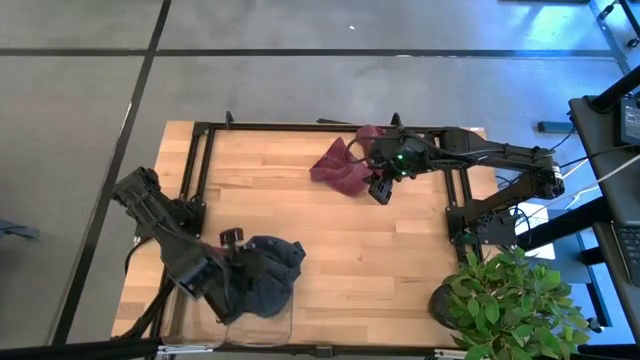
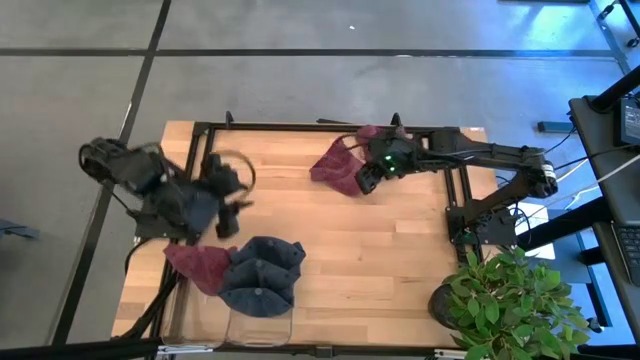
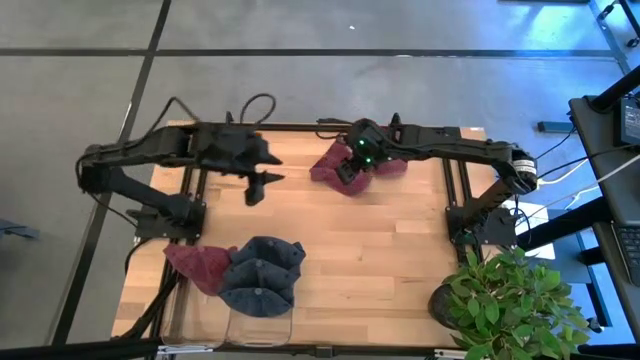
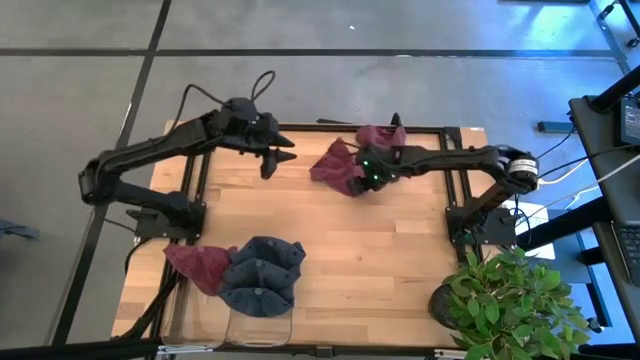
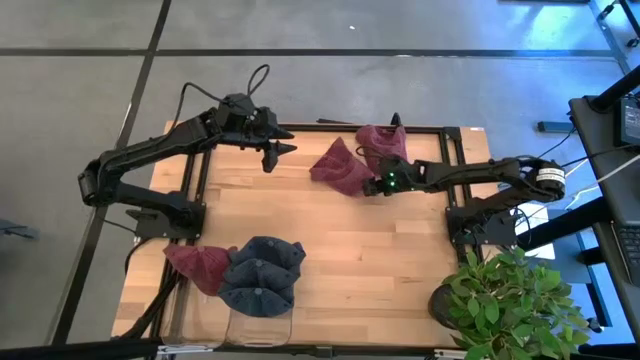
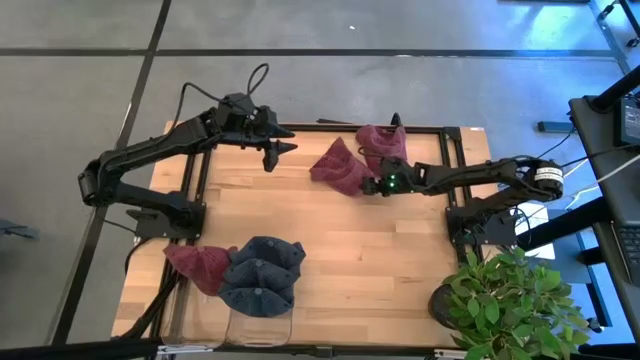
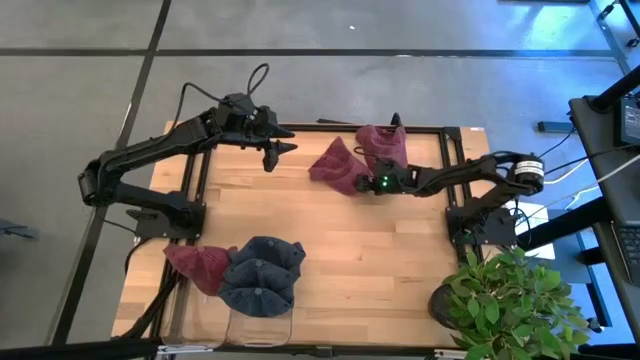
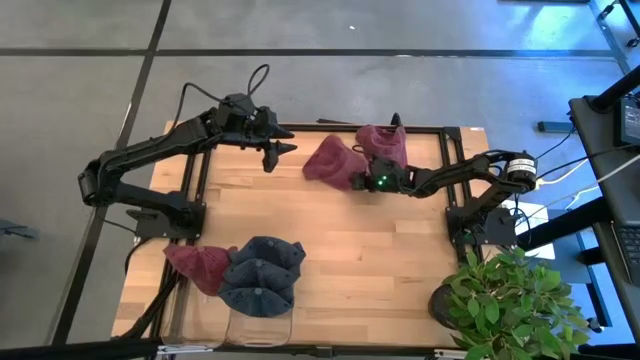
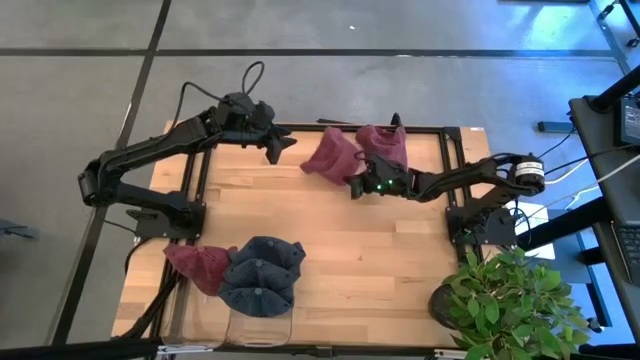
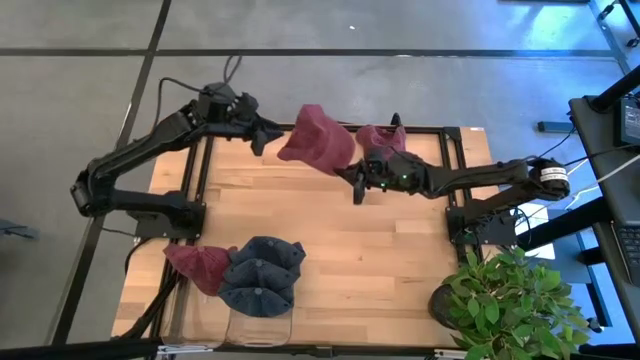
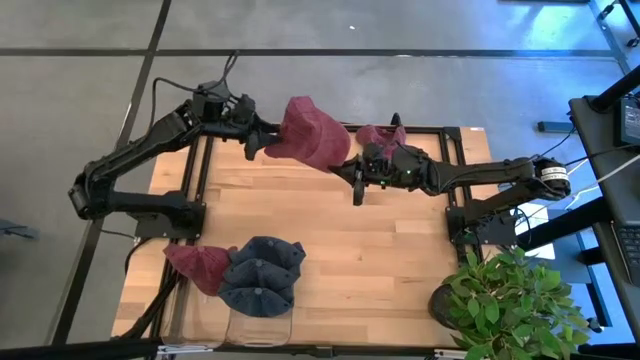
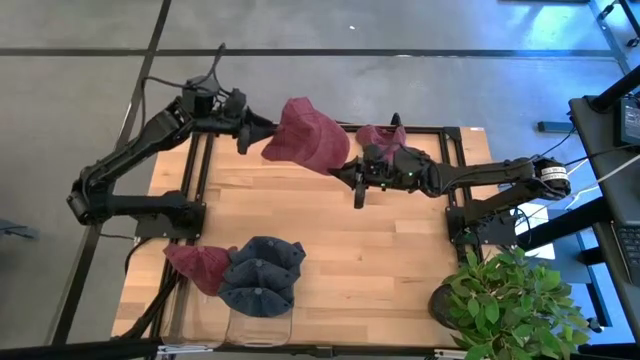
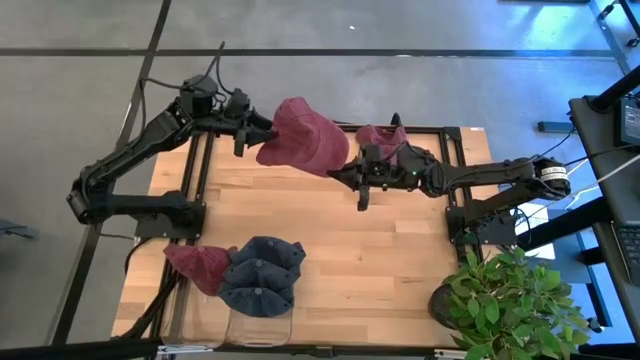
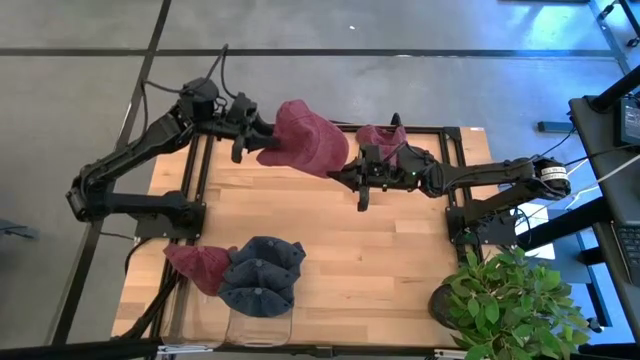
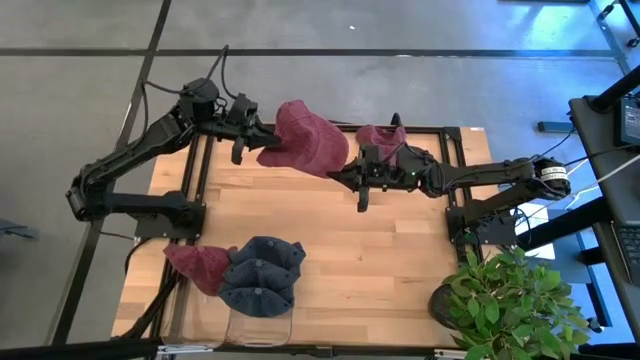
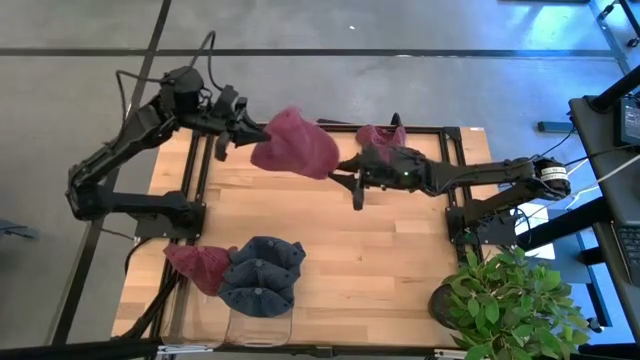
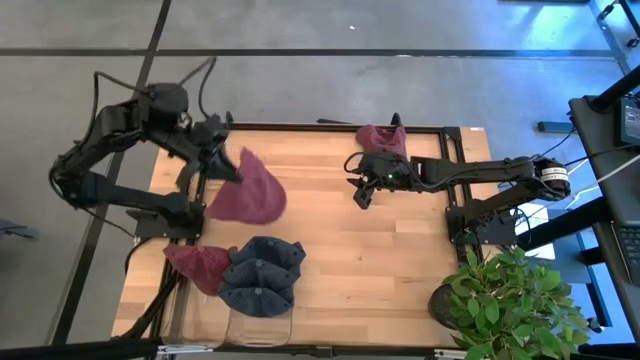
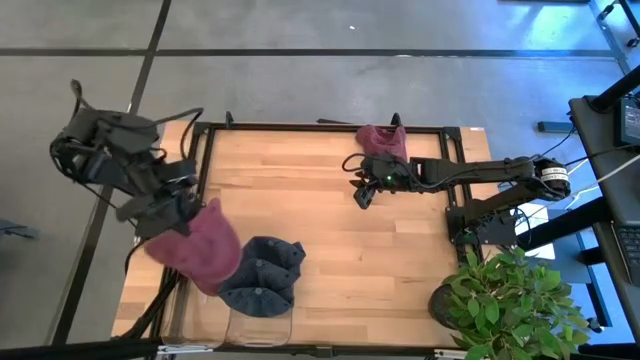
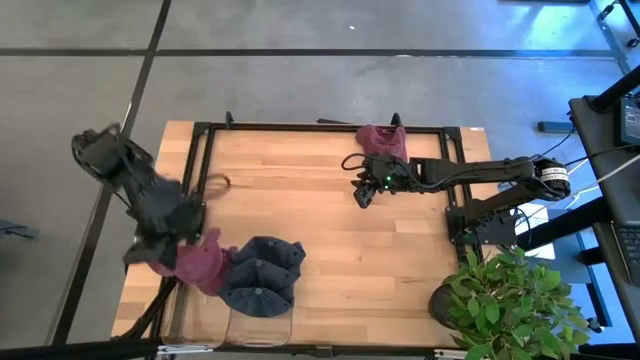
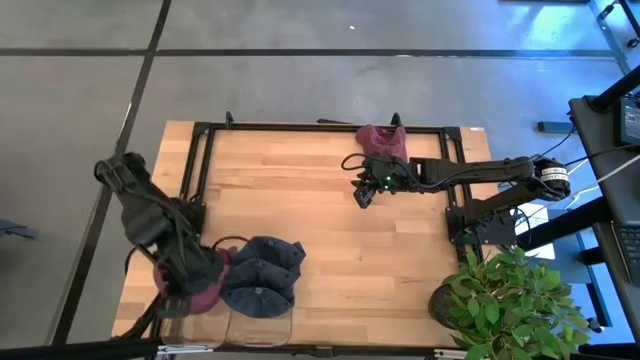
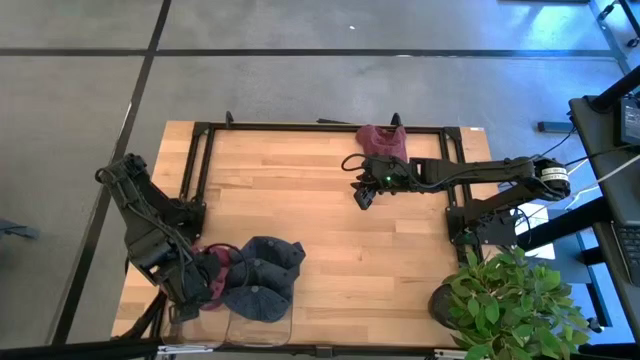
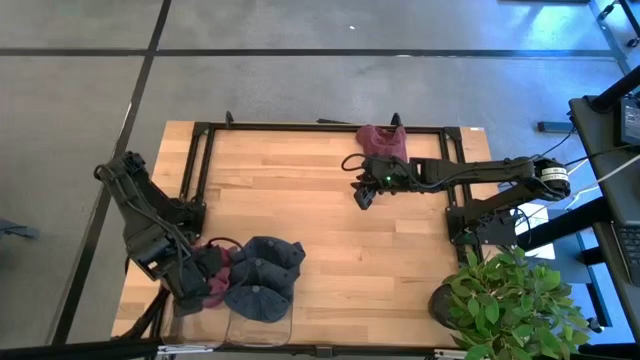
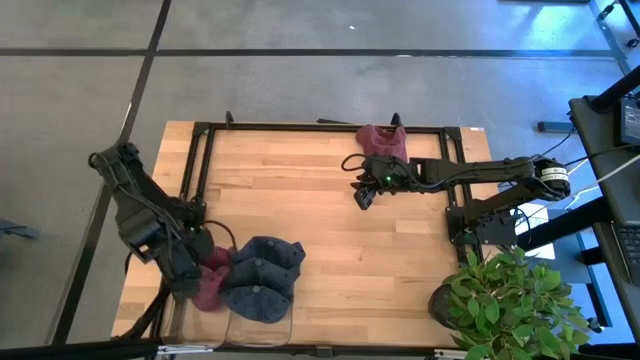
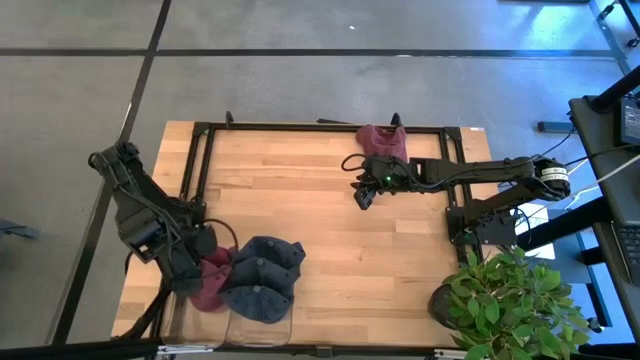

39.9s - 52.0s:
Task: Pick & Place hat
Put the left red cap into the left transparent bin

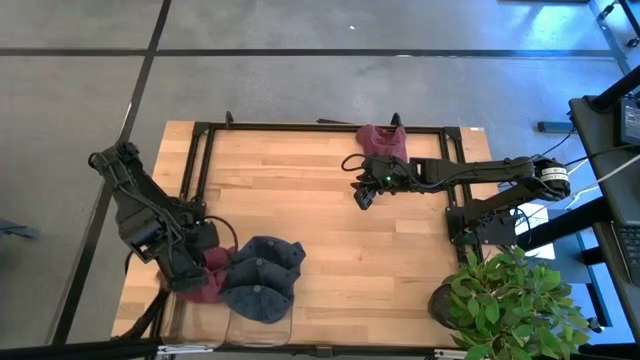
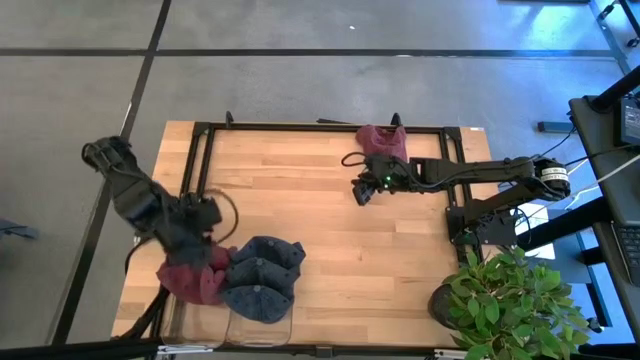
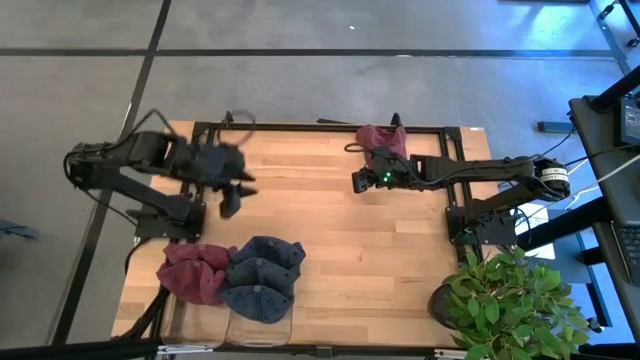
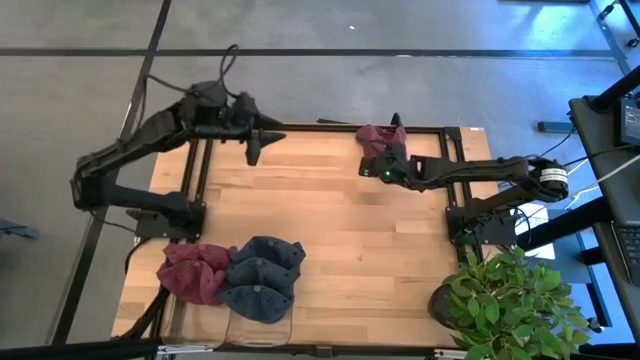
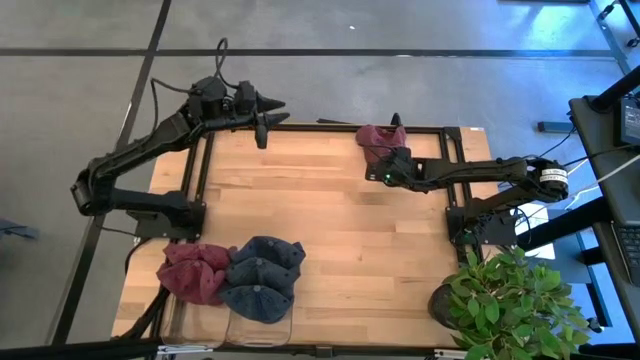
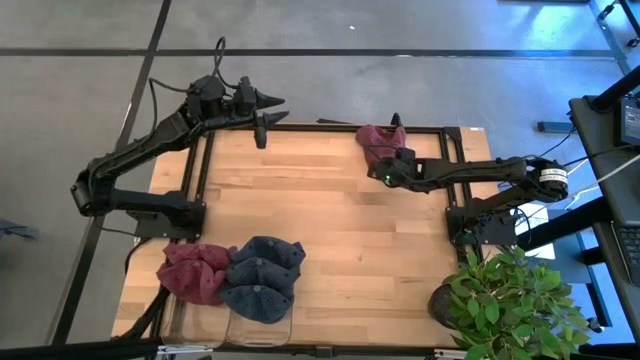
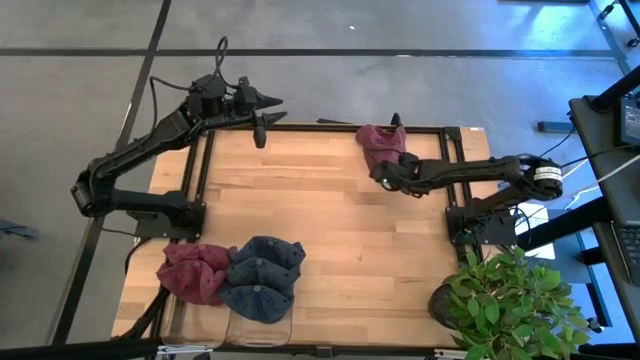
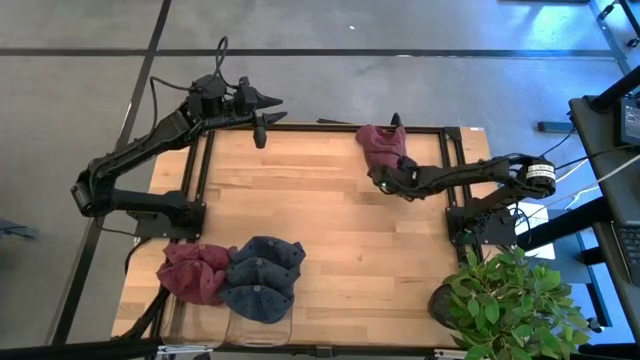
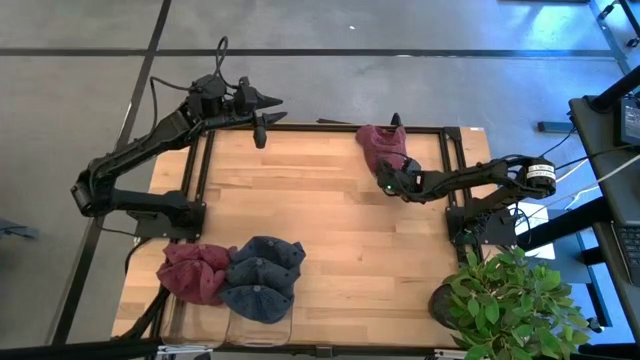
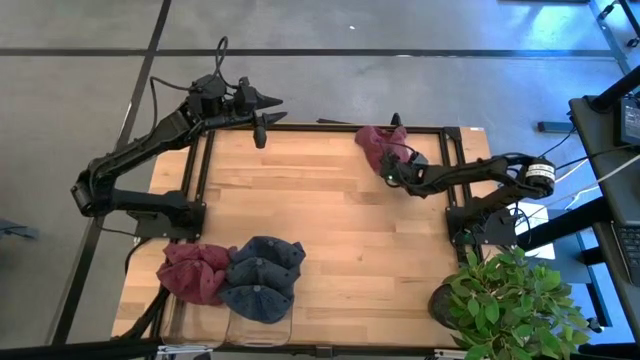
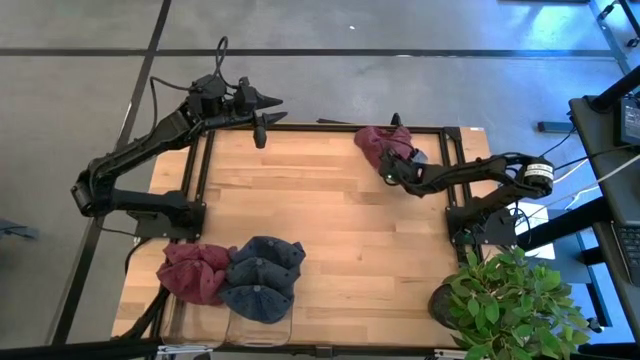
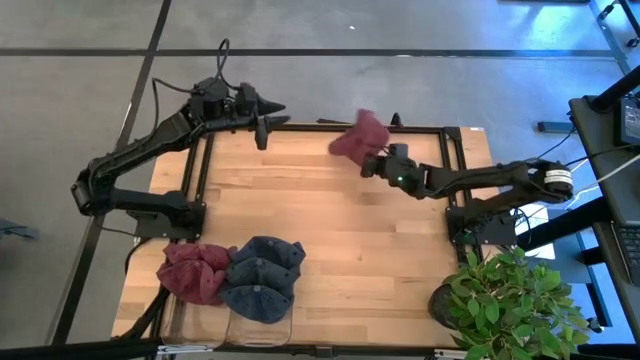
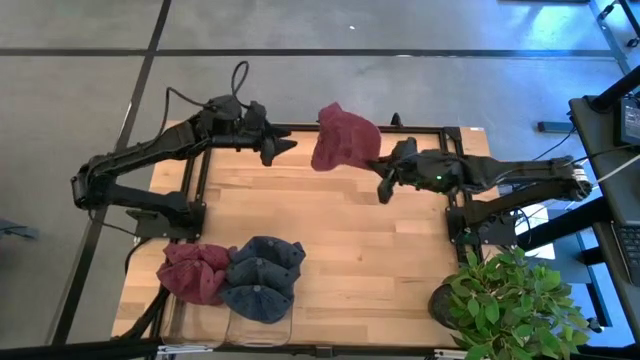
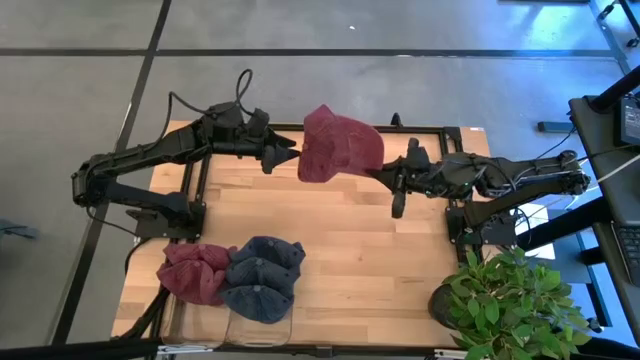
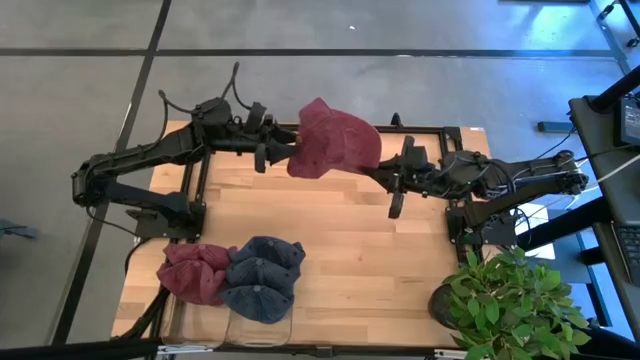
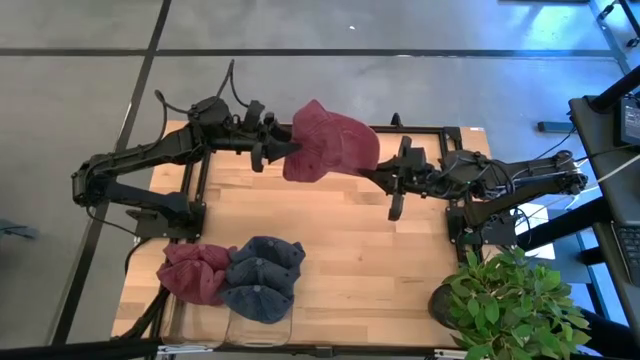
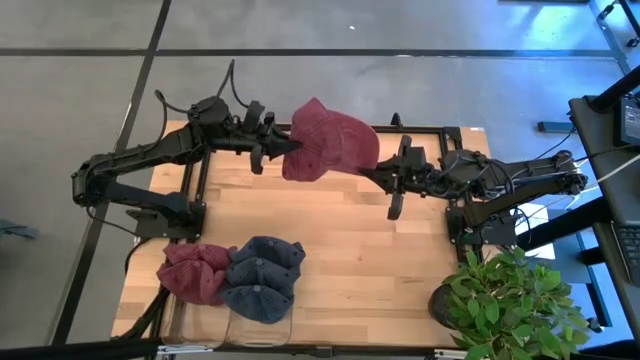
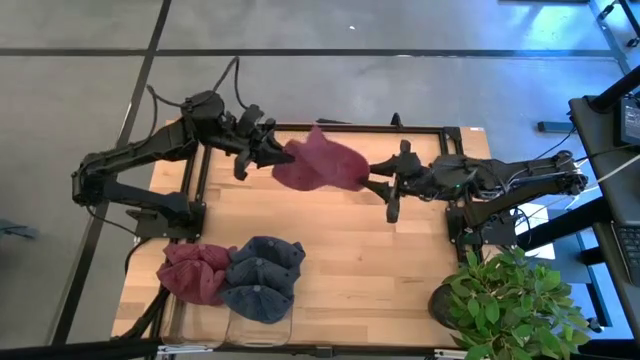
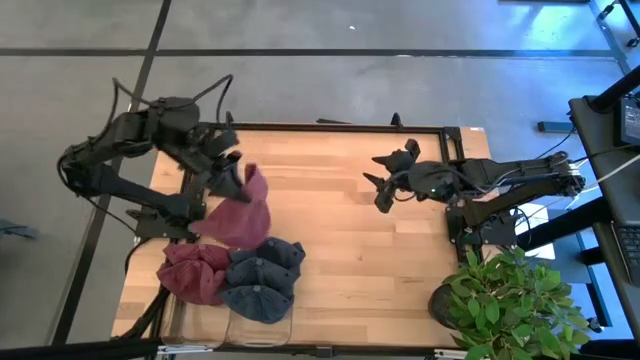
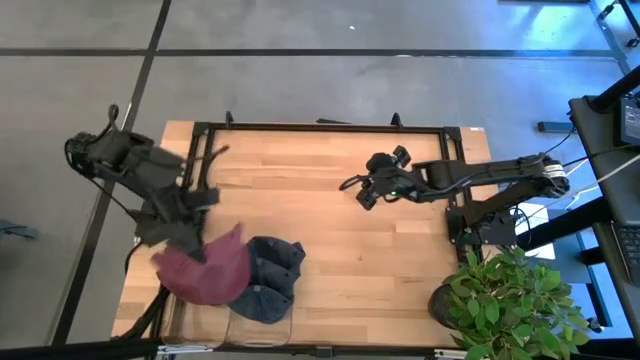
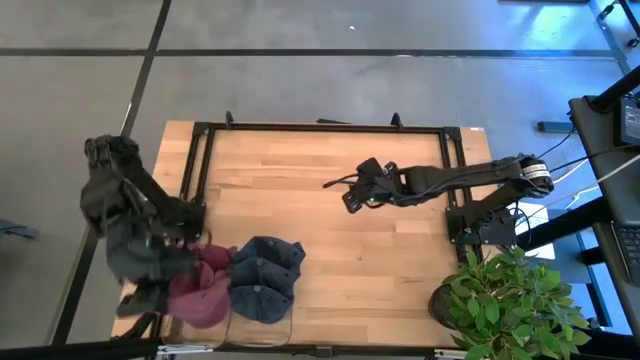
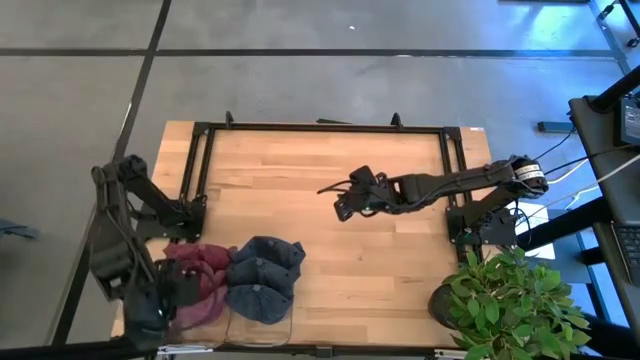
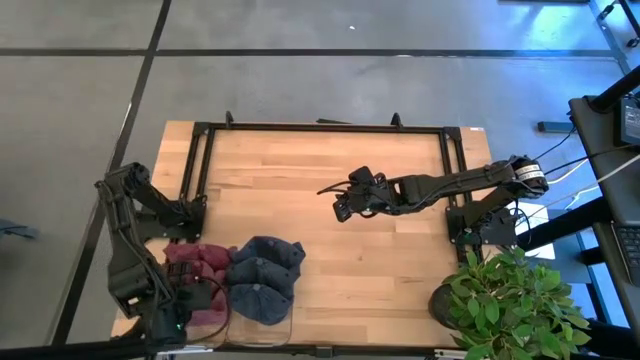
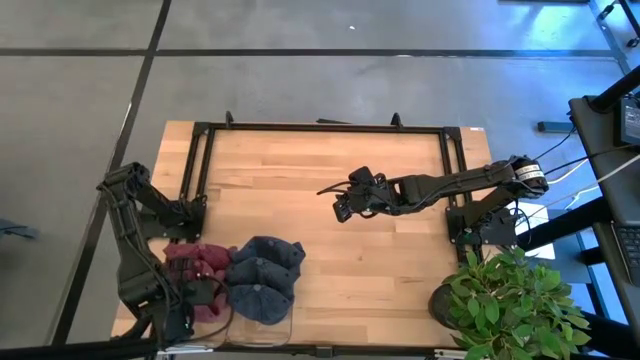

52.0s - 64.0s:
Put the red cap into the left transparent bin
